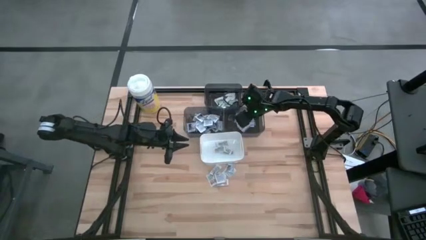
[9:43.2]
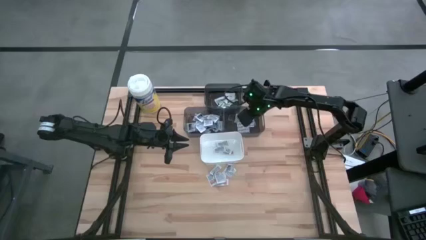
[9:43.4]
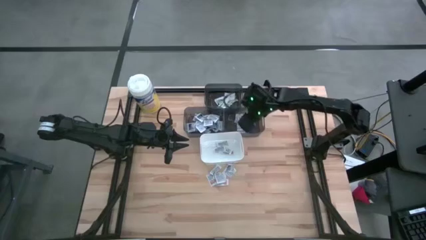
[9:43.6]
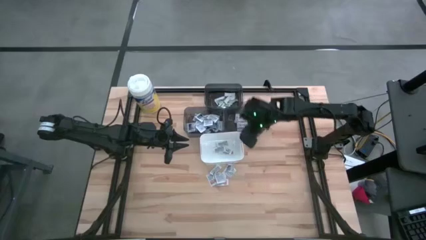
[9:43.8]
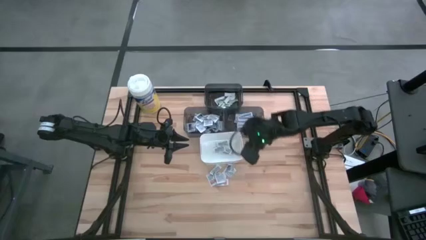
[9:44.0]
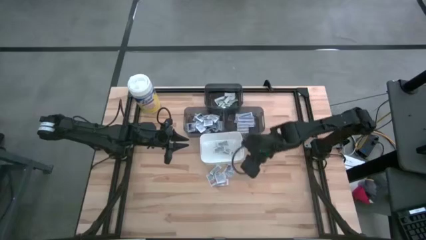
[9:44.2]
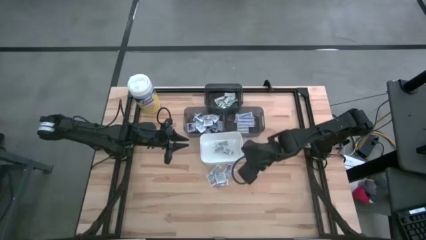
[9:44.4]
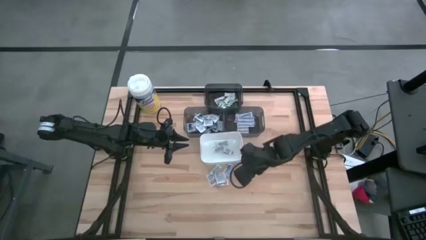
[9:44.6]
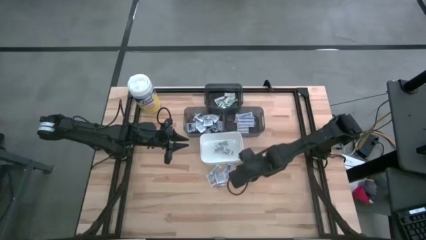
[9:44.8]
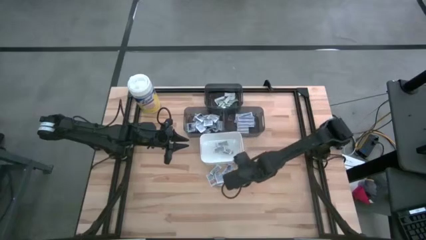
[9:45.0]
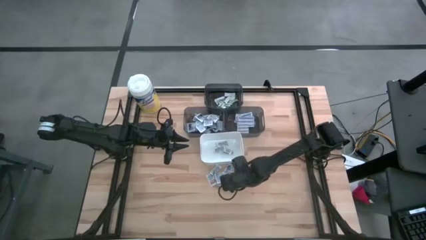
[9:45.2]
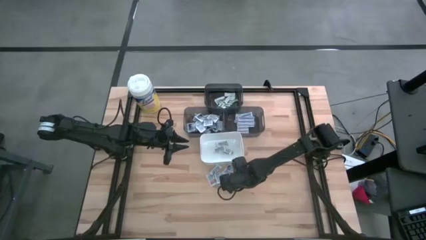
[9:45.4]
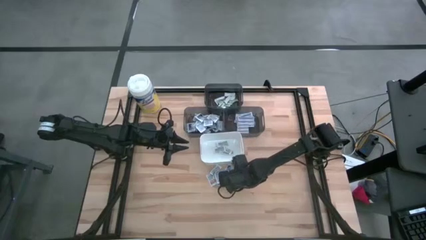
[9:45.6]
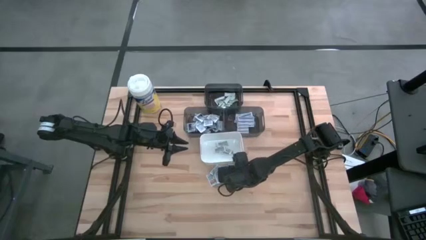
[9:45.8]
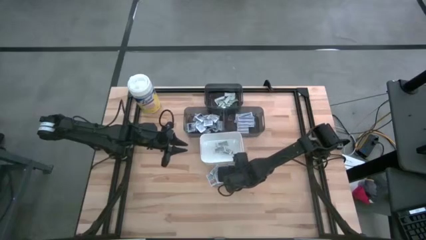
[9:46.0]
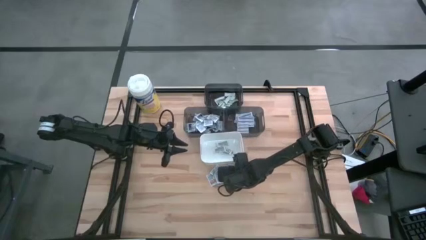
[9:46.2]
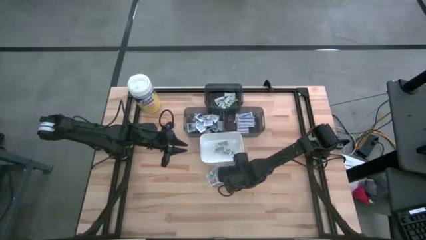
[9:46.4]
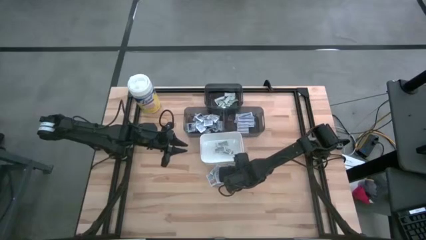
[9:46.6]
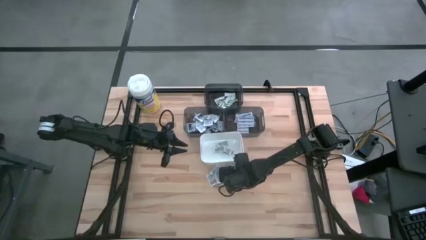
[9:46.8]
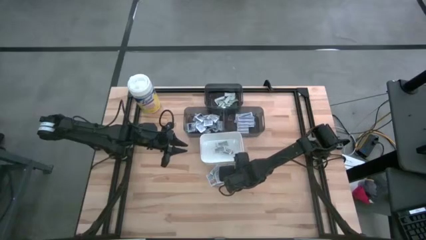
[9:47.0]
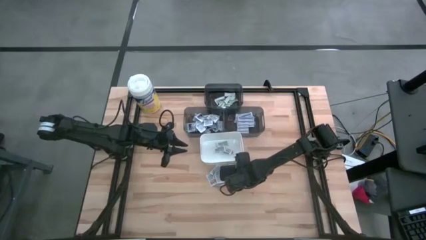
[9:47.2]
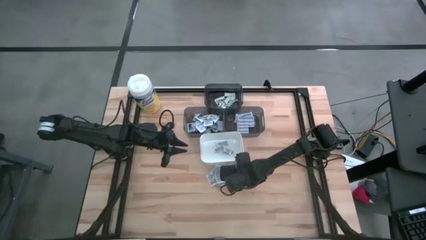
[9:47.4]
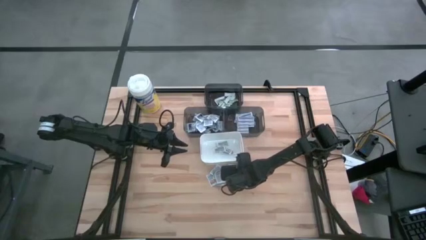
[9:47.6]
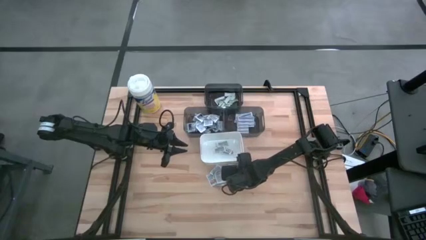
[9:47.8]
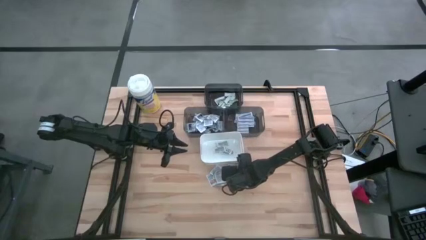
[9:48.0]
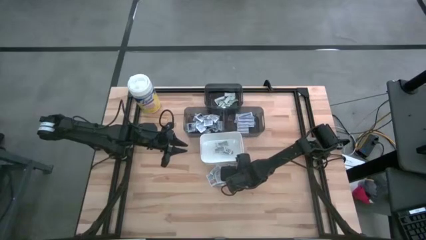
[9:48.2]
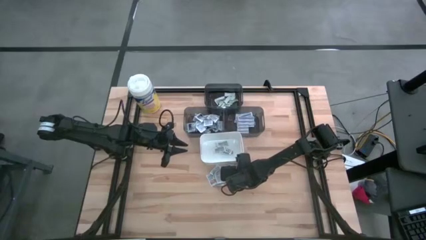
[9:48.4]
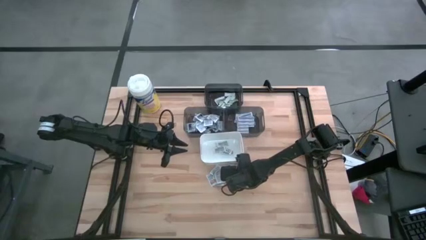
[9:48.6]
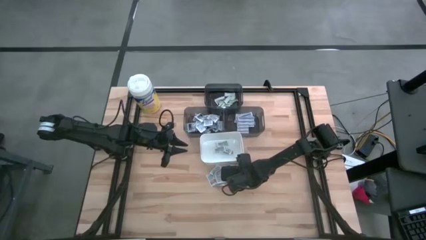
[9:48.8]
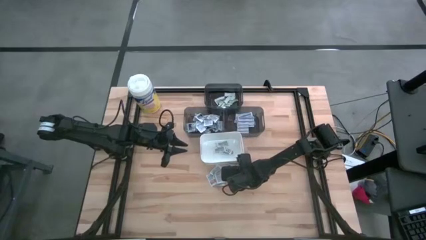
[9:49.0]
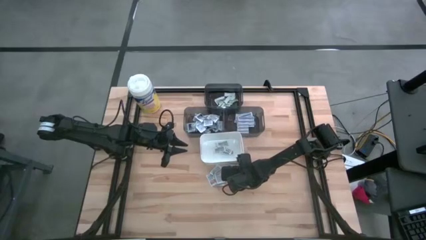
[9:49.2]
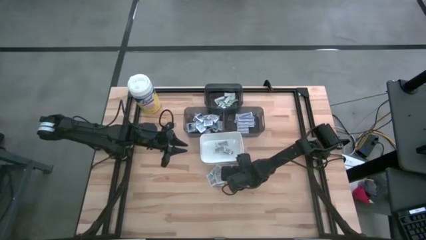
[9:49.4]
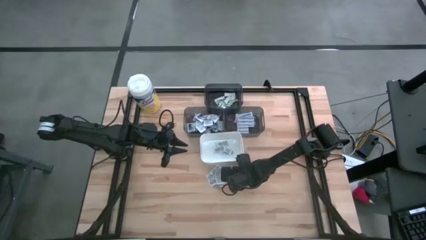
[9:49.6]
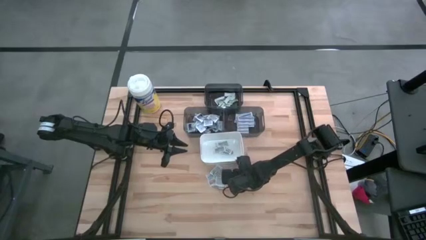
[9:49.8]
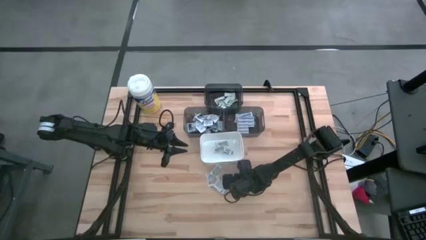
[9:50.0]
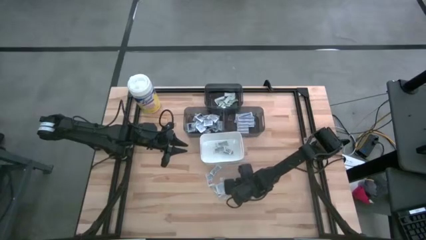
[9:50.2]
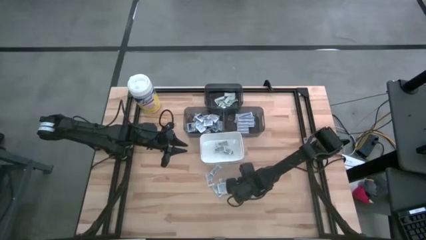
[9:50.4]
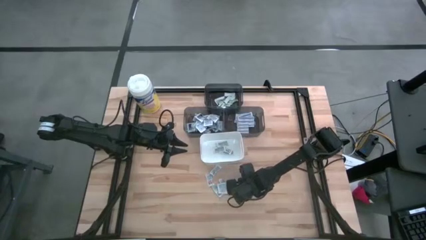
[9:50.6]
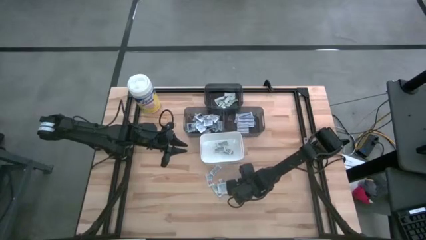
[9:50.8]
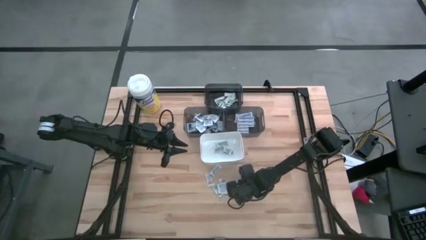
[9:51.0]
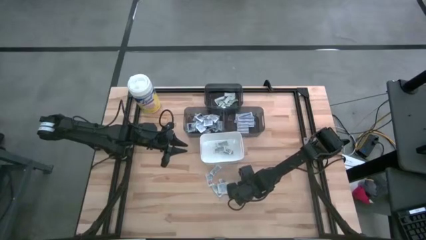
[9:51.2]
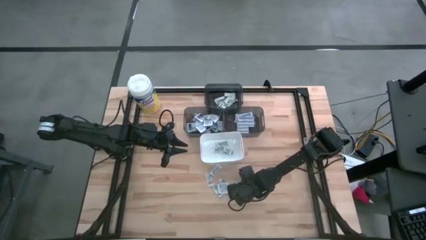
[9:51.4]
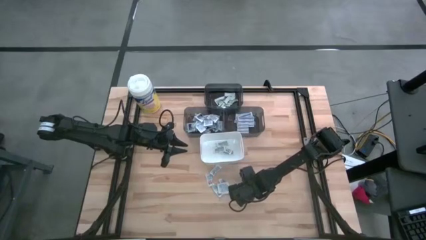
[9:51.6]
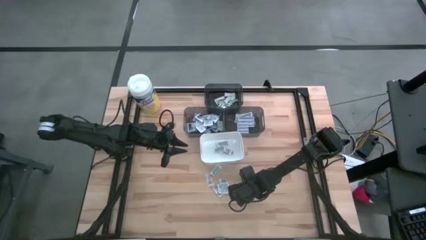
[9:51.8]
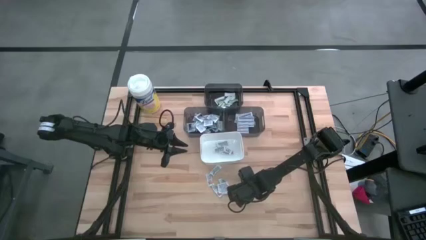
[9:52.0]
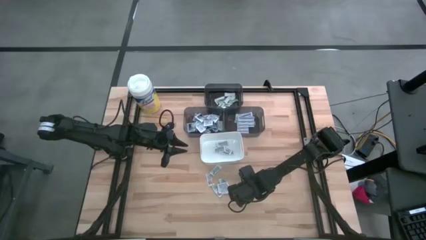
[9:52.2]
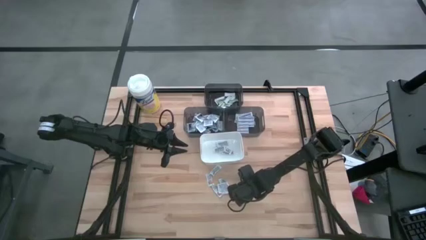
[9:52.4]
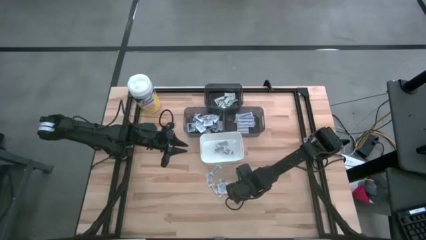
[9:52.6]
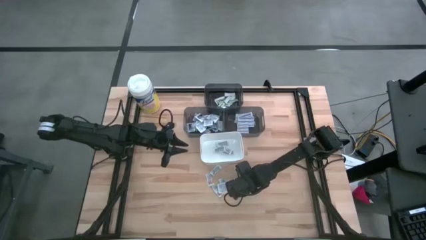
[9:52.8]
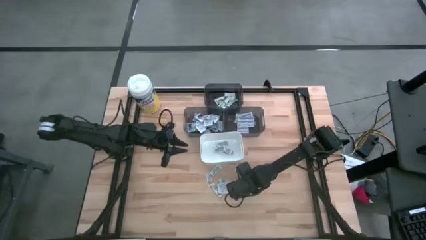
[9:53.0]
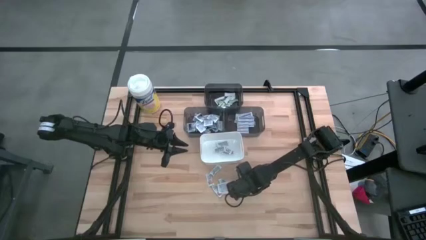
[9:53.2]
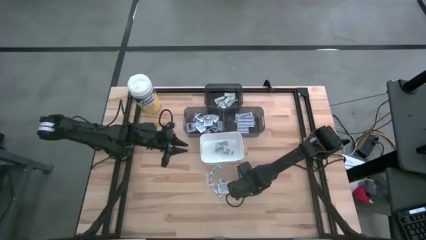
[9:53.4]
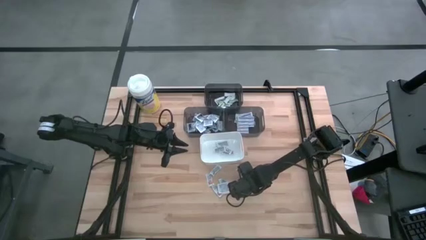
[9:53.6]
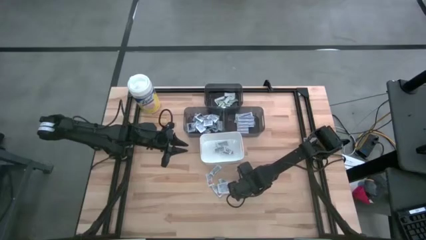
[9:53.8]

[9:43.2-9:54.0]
Task: Pick & Place First Aid Supplies
Put the alcohol pad into the left black bin

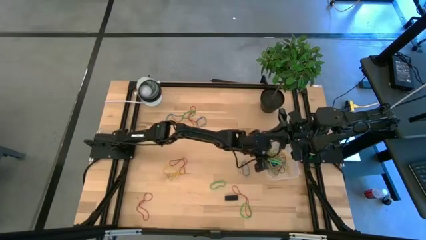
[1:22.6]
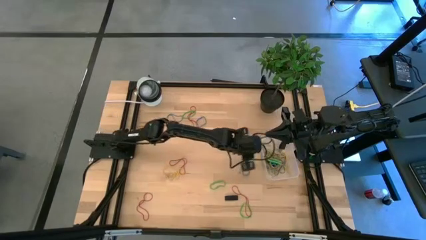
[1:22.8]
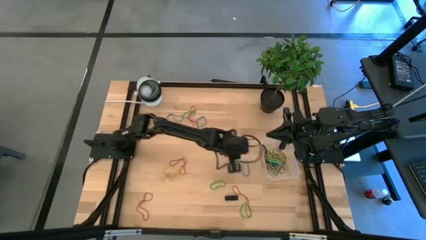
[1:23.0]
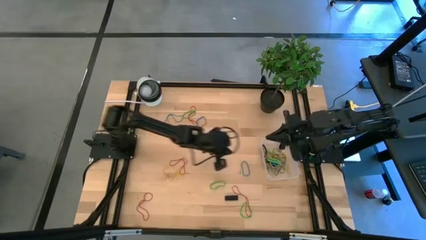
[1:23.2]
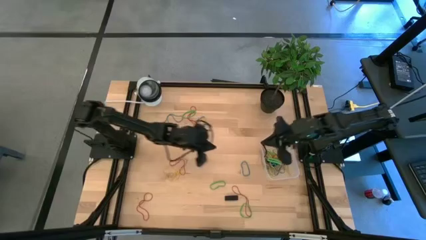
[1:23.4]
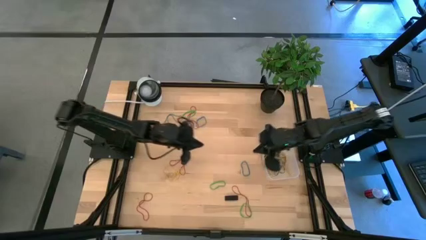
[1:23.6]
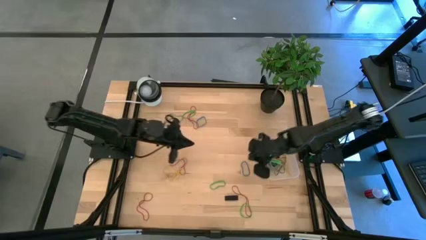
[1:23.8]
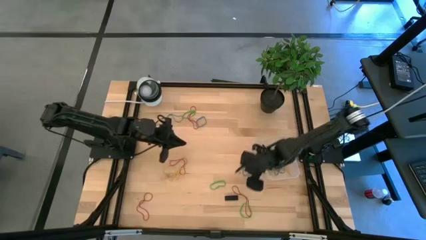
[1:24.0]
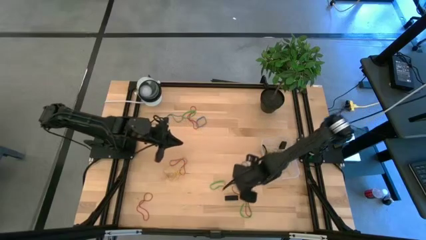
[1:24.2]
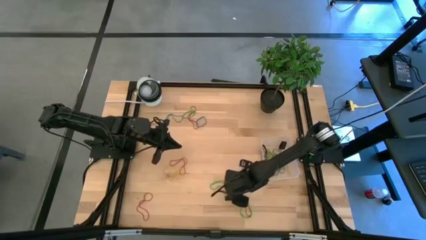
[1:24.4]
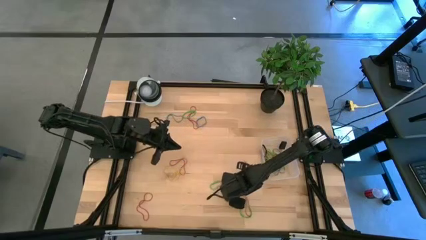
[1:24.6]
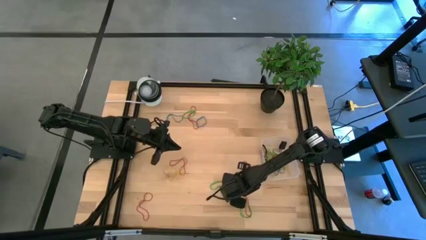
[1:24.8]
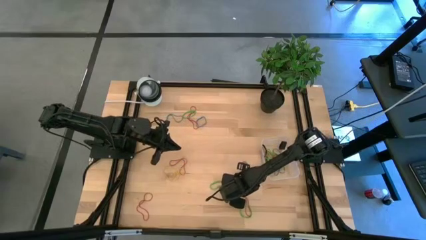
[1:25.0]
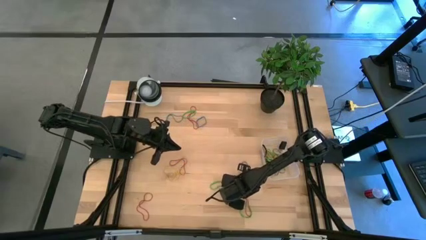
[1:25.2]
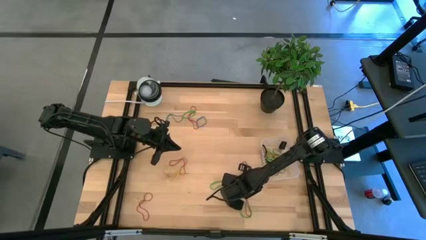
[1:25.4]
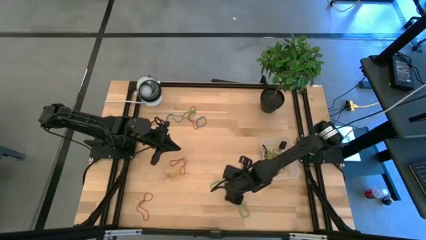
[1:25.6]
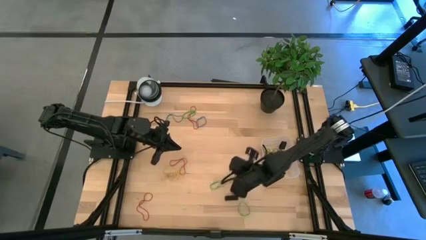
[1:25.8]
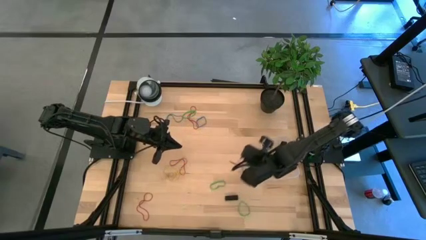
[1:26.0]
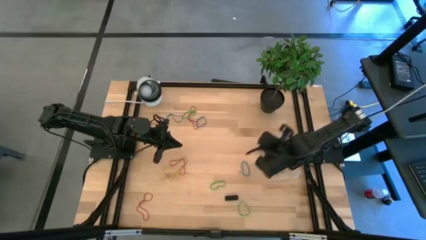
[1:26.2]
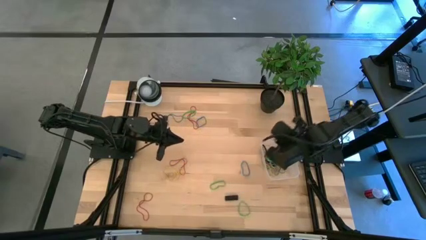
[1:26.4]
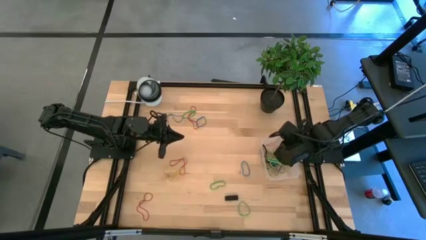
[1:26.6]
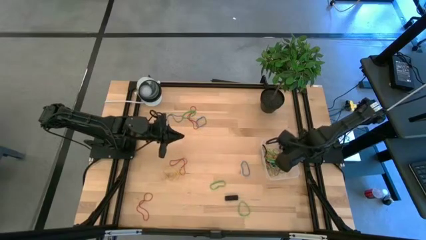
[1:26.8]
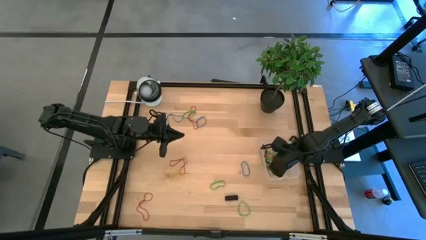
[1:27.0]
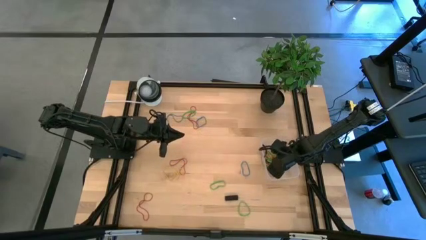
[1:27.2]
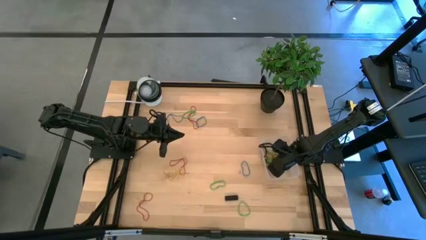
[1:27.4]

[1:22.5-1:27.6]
Task: Pick and place rubber bands into bin
Put the red rubber band into the transparent bin

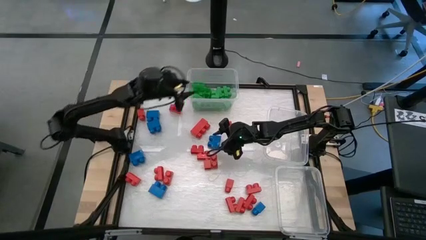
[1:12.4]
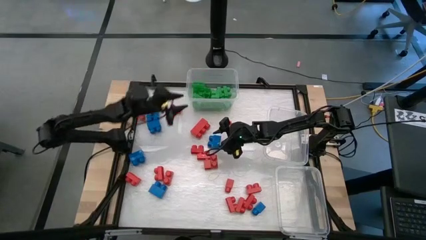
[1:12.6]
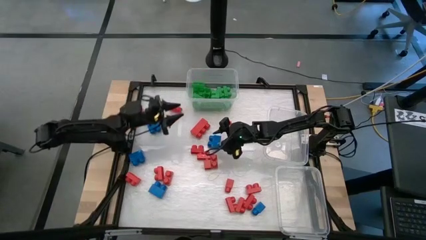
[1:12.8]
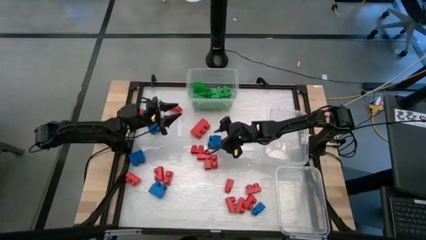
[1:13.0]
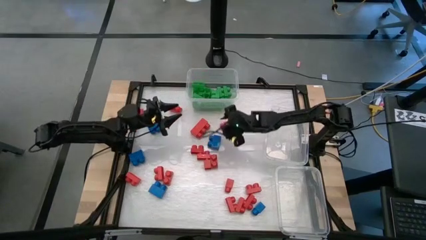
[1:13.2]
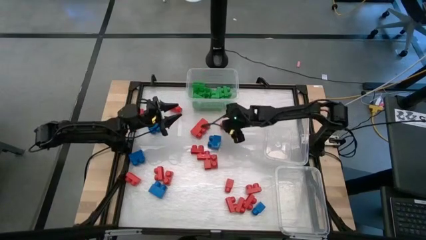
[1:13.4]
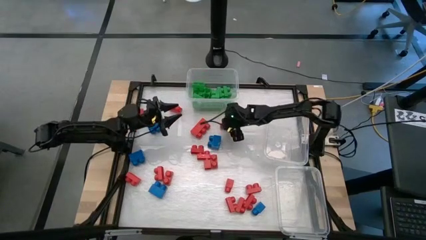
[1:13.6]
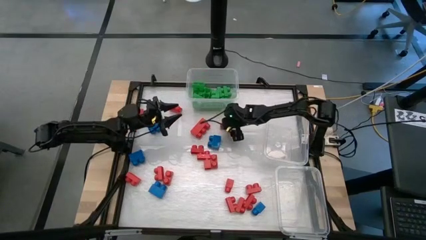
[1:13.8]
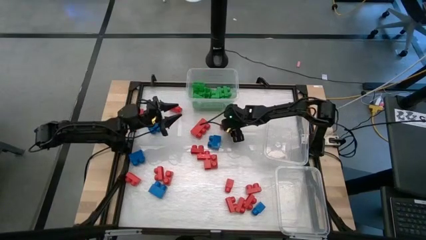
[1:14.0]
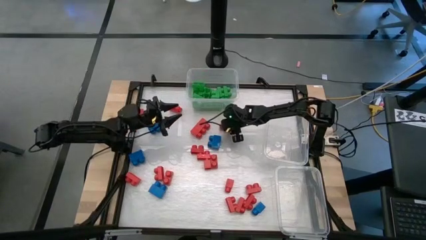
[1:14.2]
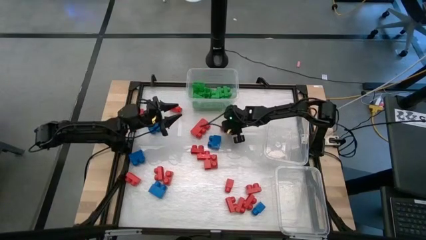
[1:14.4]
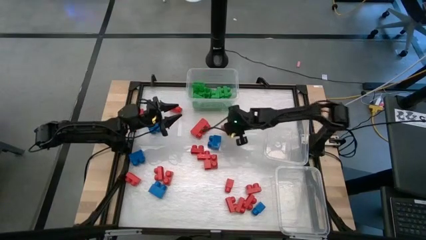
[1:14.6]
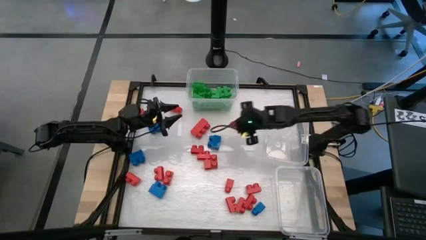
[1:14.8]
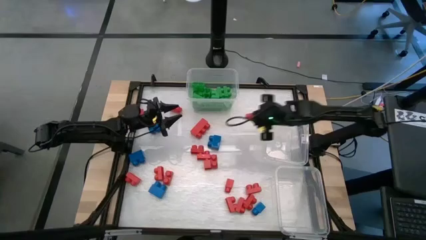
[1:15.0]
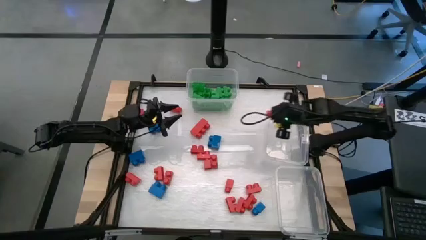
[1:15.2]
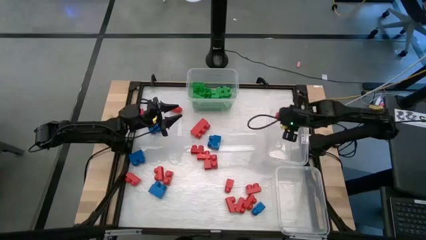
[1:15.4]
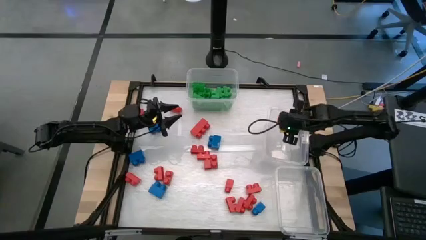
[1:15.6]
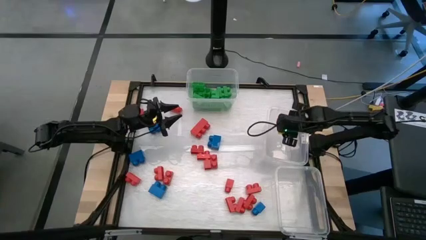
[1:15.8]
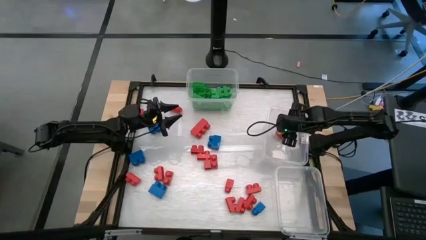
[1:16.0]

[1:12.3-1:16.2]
Task: Sort blocks
Put the red game piece into the middle right transparent bin
